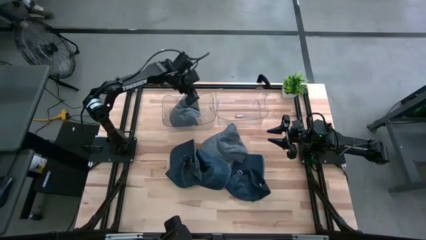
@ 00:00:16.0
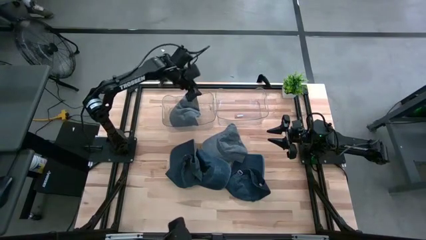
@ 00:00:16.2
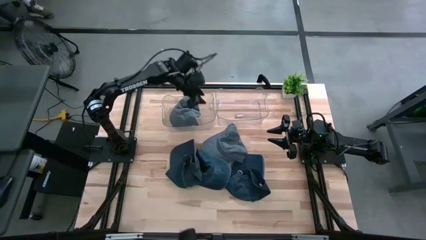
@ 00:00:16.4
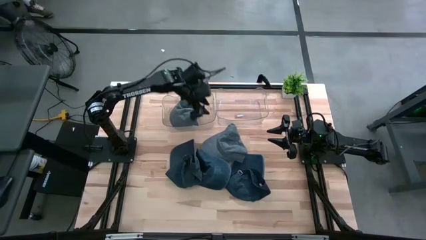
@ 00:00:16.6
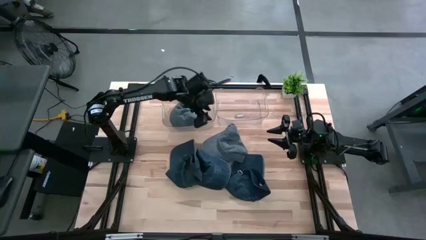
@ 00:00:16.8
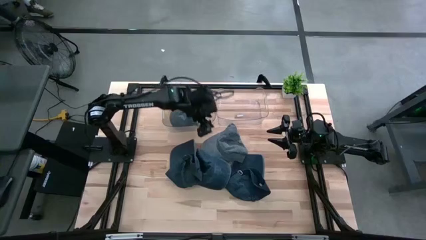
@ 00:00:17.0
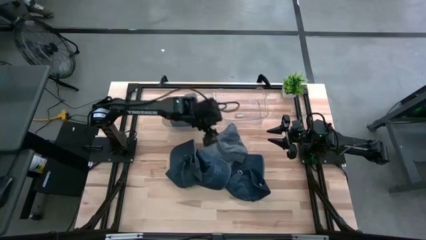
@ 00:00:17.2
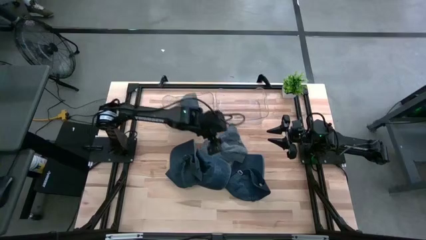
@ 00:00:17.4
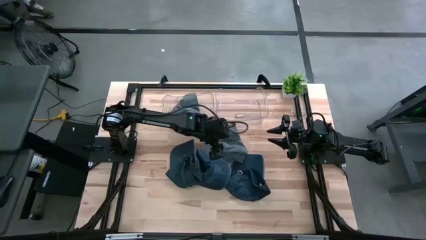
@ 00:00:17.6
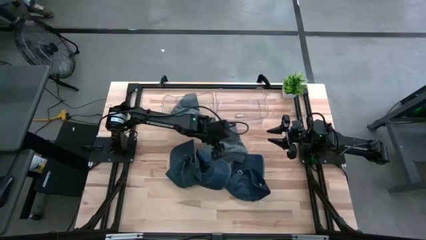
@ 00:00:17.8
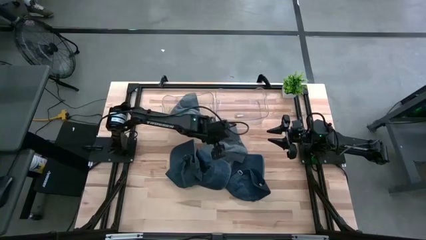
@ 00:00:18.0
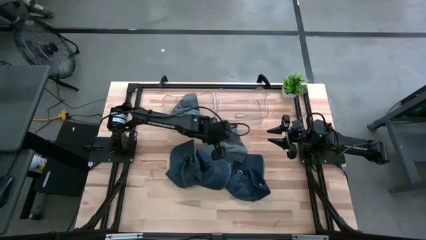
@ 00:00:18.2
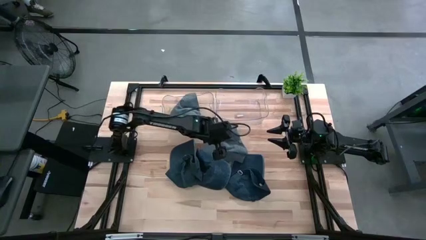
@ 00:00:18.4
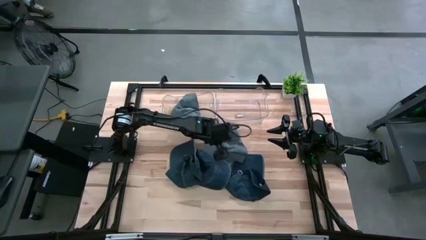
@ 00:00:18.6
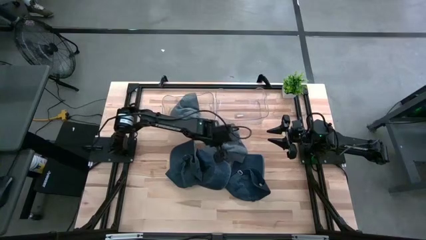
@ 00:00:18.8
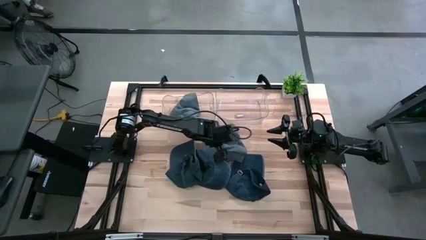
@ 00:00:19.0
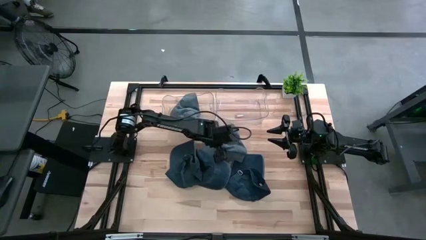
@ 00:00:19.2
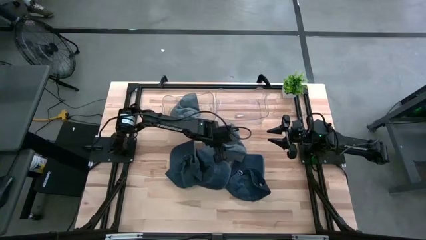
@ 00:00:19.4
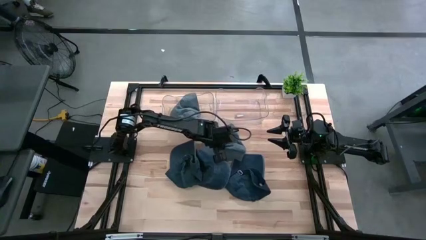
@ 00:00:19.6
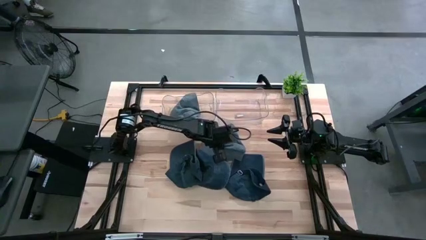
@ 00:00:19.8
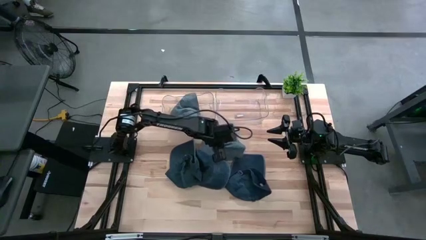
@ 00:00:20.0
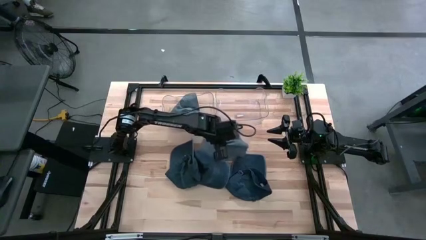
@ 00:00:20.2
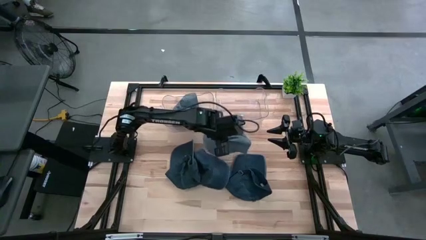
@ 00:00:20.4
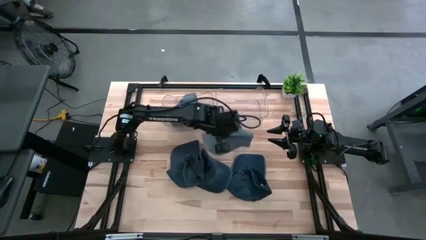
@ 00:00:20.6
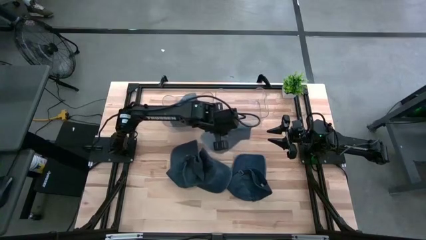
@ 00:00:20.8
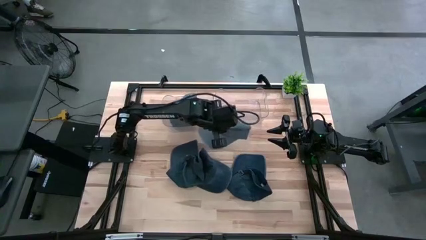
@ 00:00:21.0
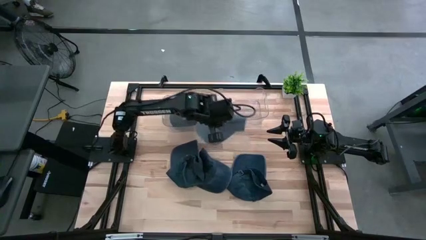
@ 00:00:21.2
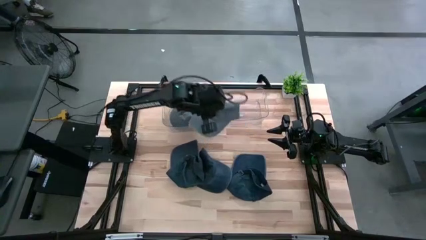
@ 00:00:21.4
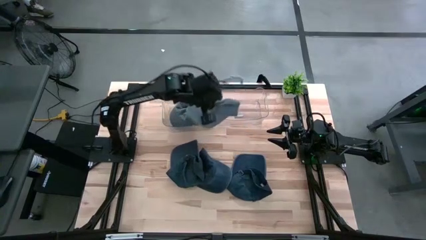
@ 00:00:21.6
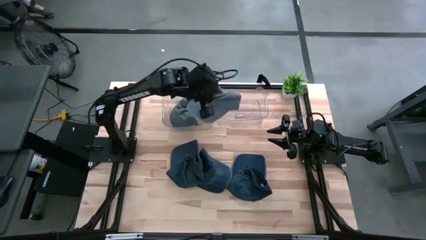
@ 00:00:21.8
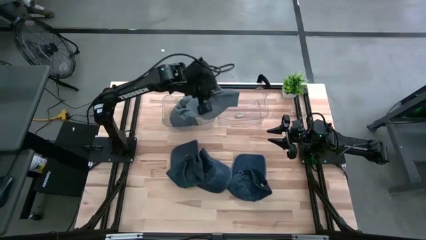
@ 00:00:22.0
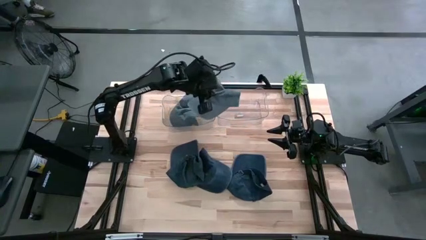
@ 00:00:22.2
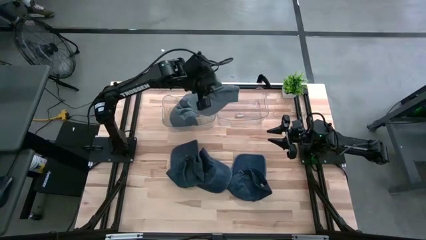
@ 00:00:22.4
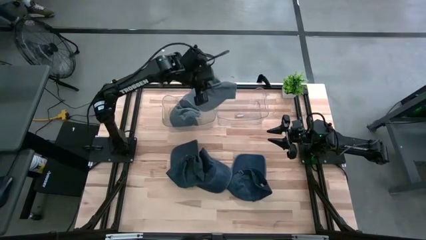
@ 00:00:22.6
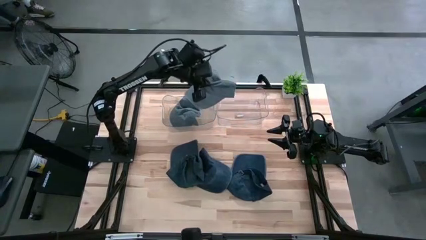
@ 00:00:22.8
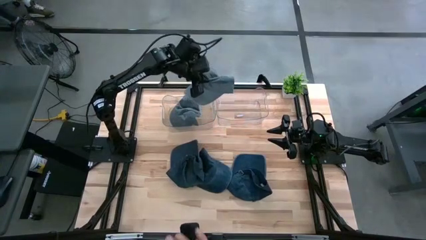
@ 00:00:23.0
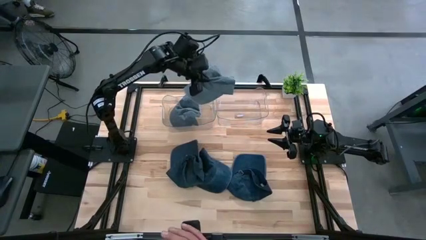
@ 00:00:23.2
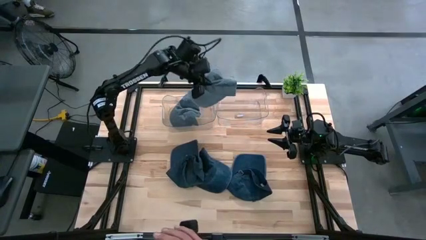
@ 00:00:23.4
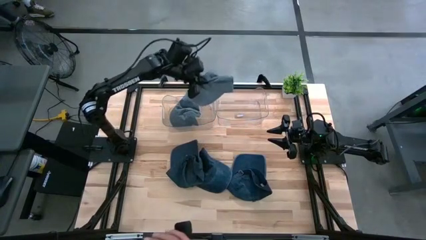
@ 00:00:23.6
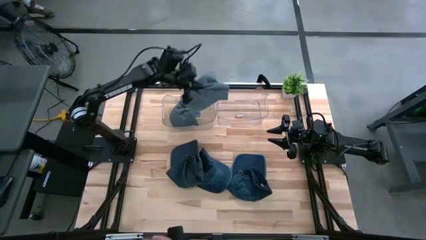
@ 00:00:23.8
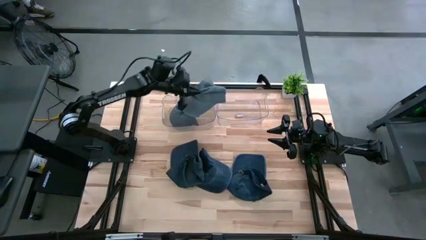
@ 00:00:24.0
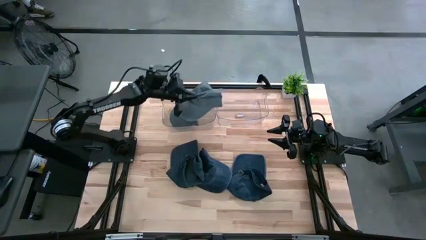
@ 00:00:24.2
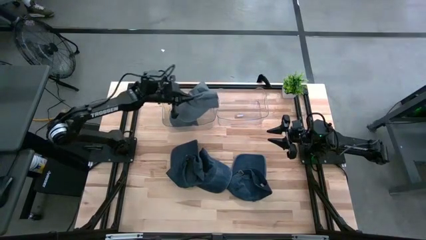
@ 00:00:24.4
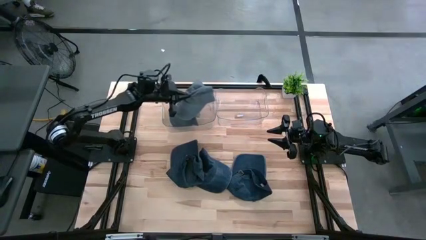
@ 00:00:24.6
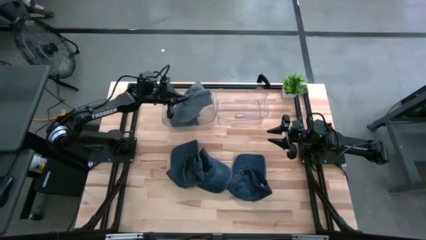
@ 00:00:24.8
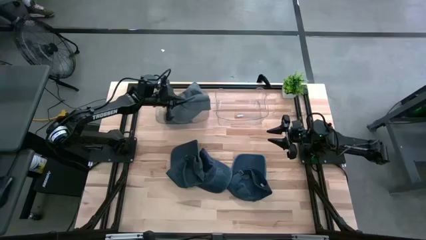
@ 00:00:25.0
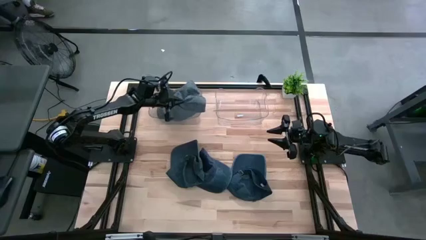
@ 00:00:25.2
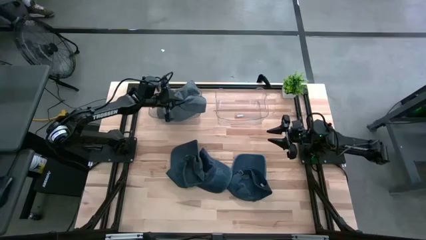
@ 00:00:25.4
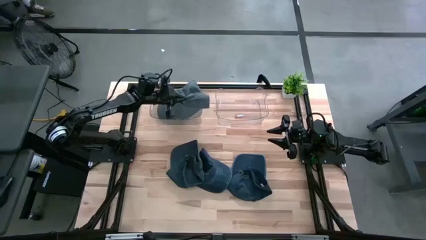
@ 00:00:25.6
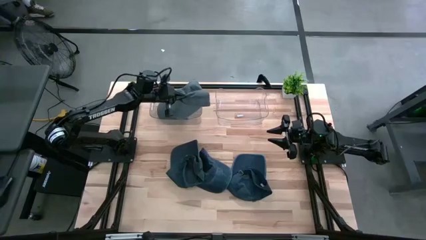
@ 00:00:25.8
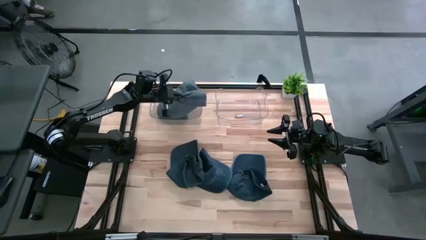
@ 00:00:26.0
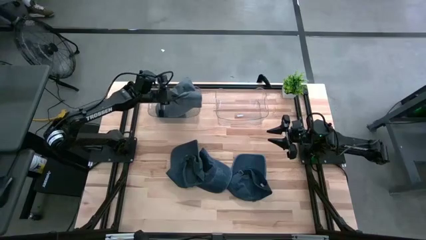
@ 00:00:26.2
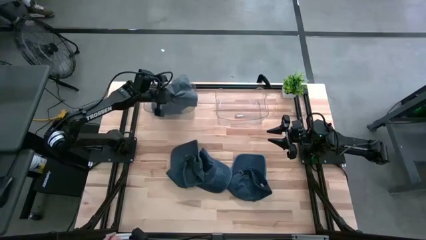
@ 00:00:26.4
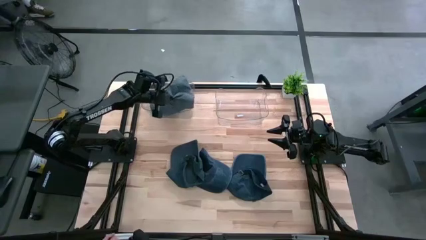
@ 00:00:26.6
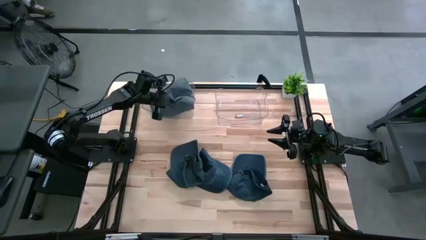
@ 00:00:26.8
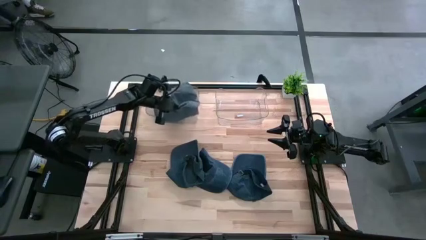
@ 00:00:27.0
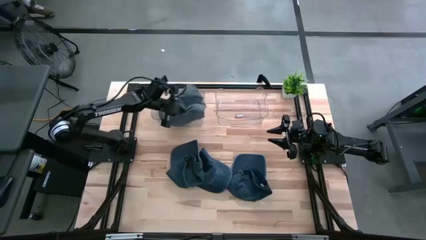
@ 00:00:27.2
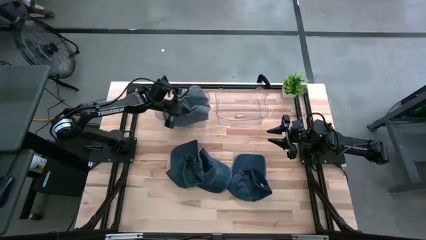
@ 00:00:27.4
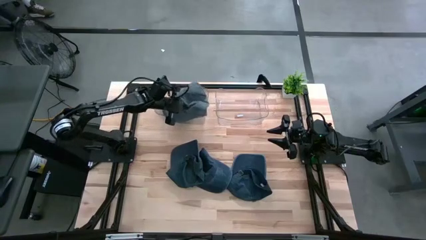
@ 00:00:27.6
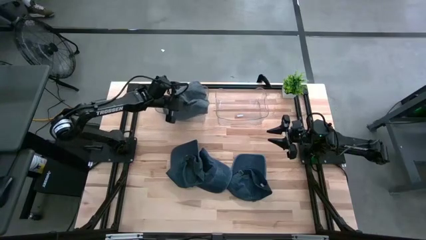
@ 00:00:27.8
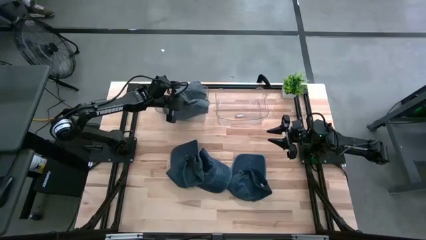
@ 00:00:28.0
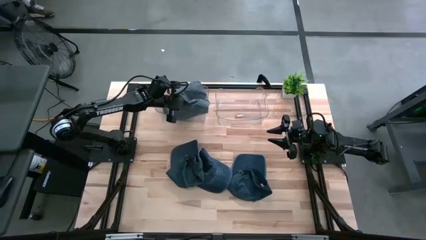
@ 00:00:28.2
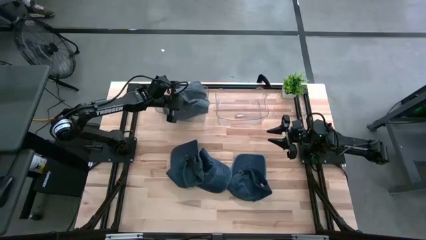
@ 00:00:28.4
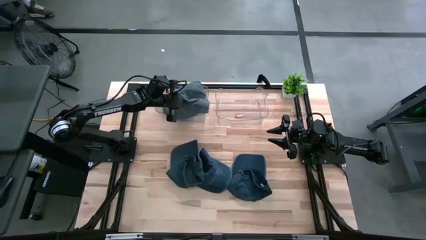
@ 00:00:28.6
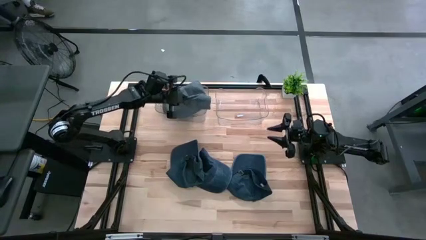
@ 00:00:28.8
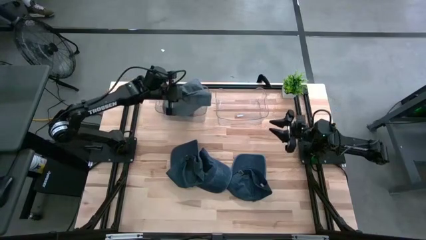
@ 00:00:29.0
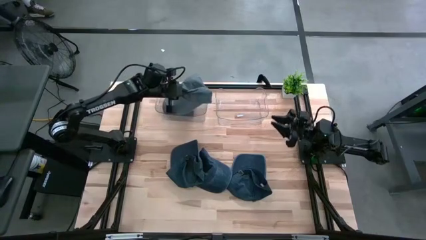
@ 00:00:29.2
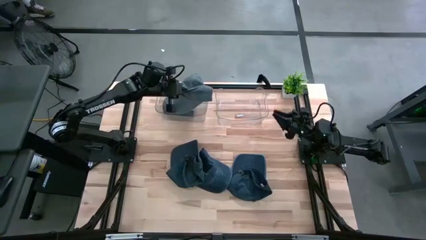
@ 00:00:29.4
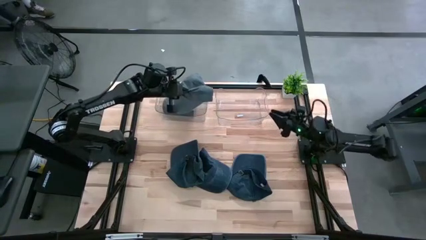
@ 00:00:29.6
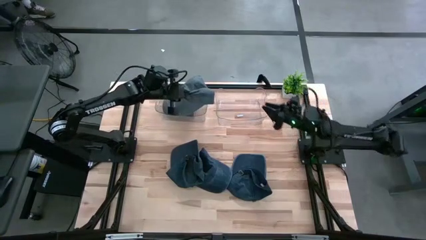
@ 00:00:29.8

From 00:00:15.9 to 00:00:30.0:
Task: Pick & Place hat
Put the gray cap into the left transparent bin
